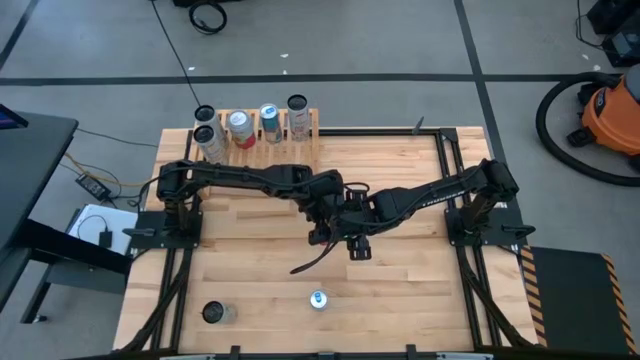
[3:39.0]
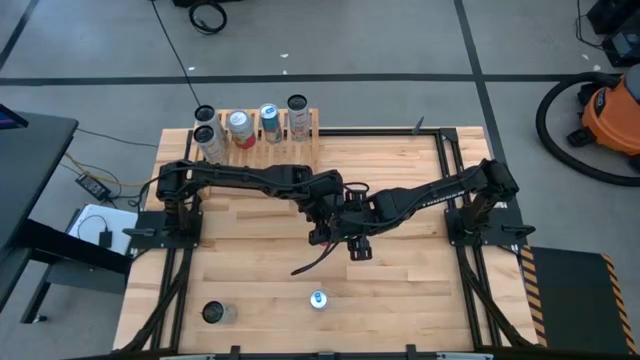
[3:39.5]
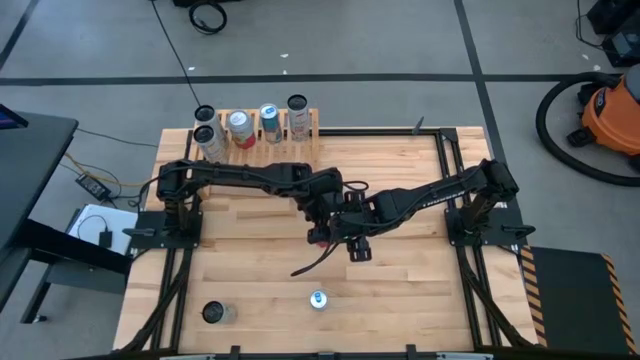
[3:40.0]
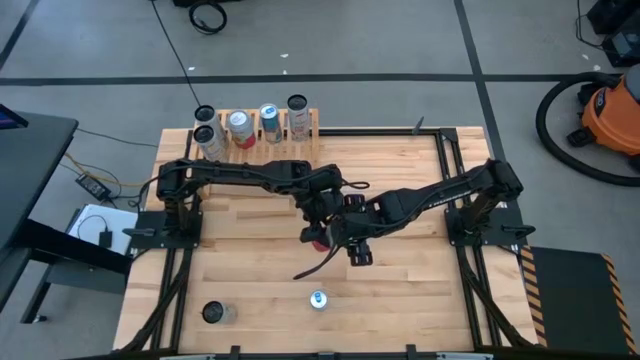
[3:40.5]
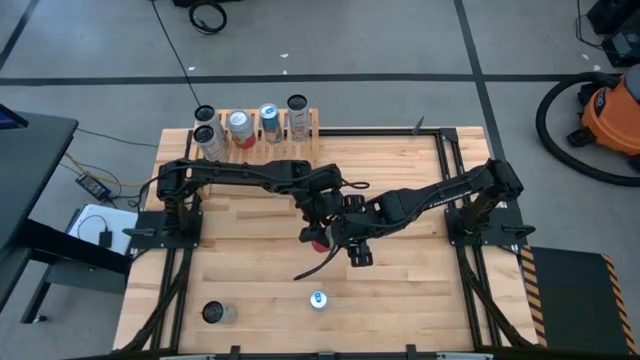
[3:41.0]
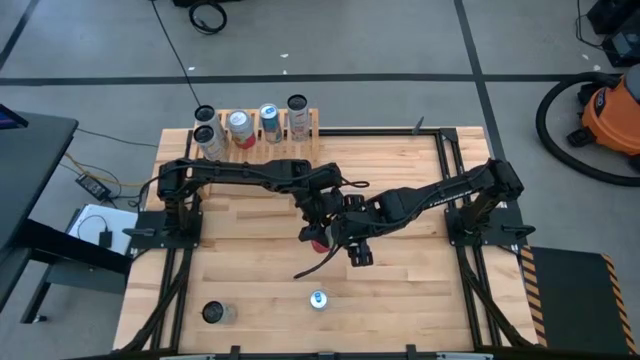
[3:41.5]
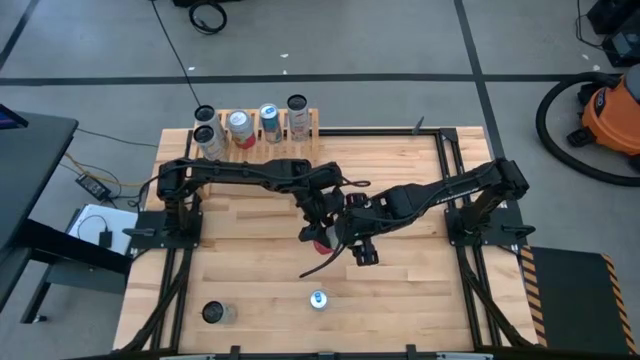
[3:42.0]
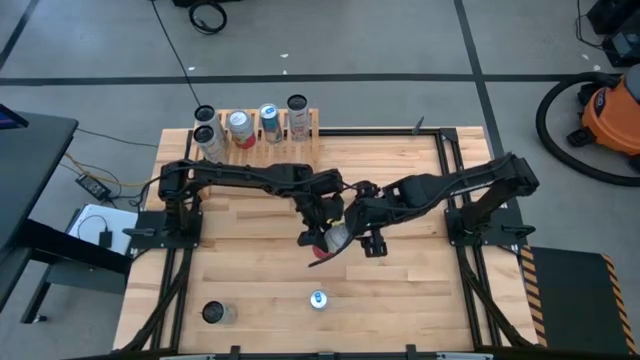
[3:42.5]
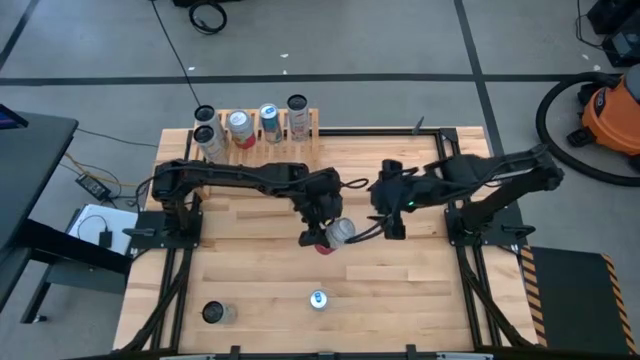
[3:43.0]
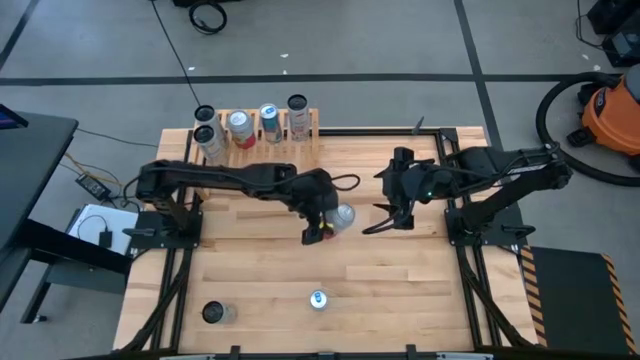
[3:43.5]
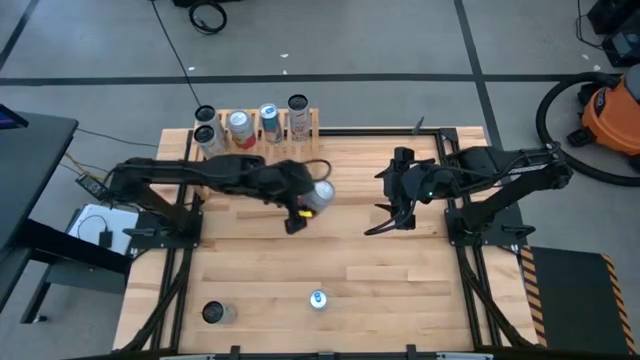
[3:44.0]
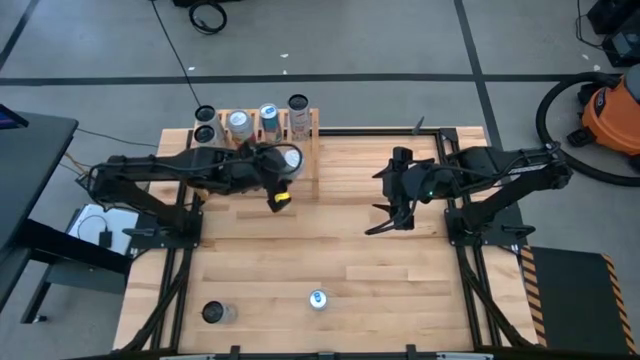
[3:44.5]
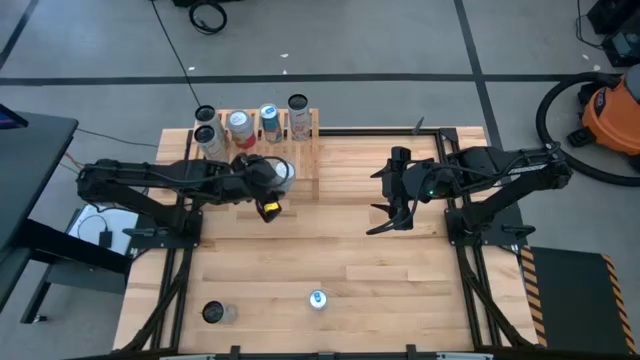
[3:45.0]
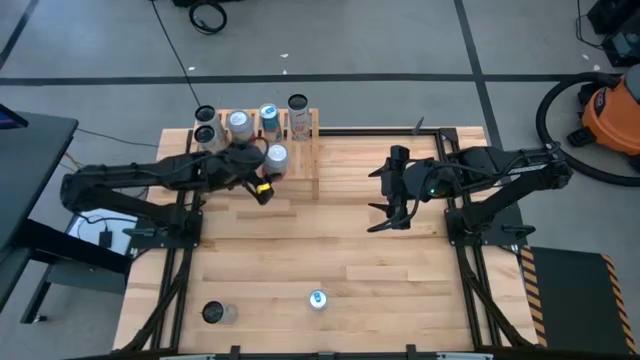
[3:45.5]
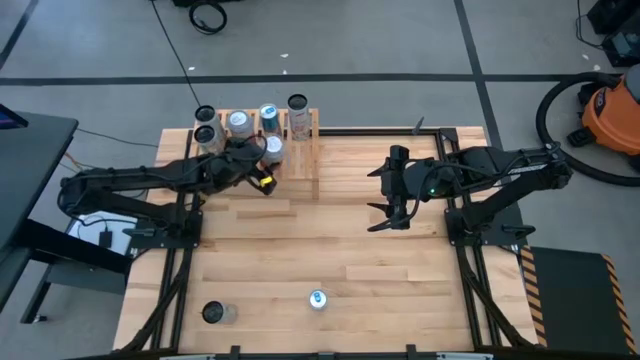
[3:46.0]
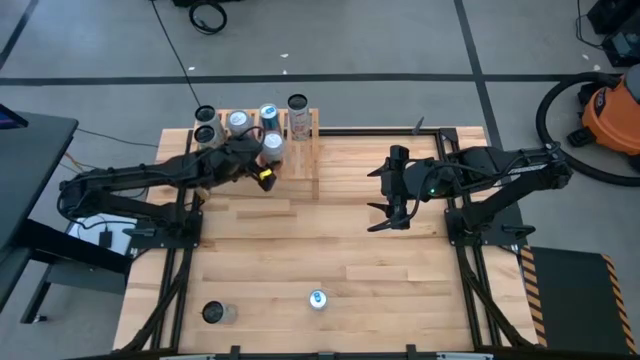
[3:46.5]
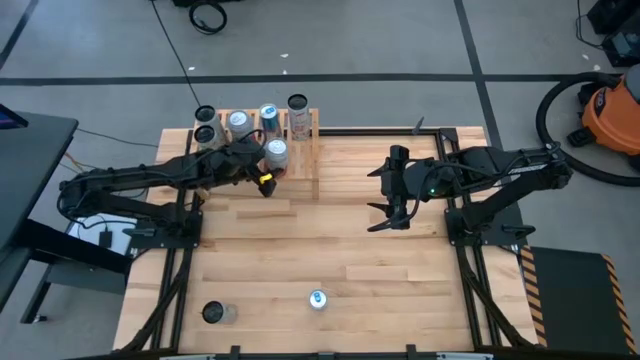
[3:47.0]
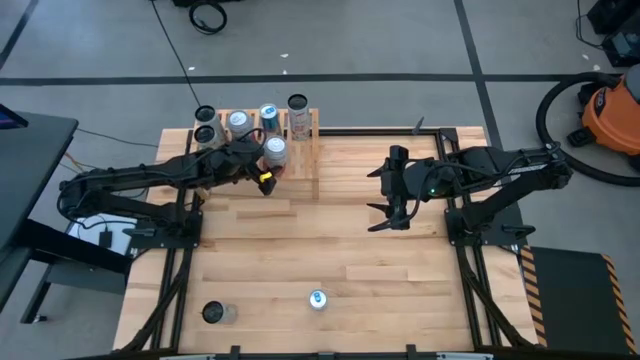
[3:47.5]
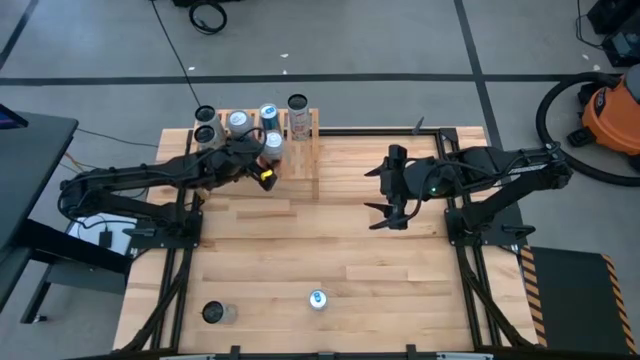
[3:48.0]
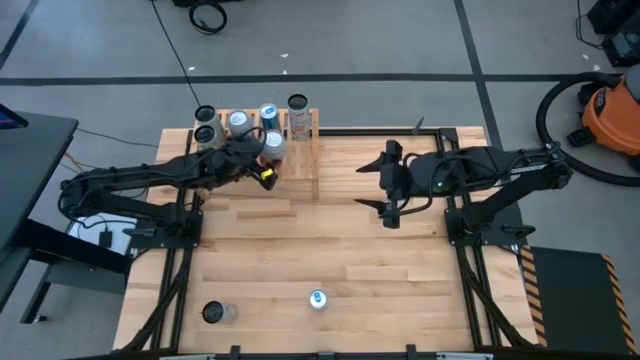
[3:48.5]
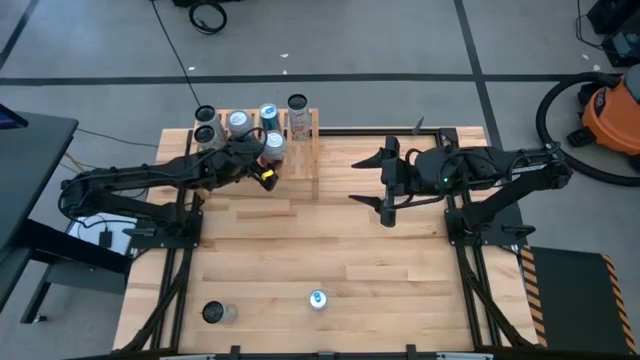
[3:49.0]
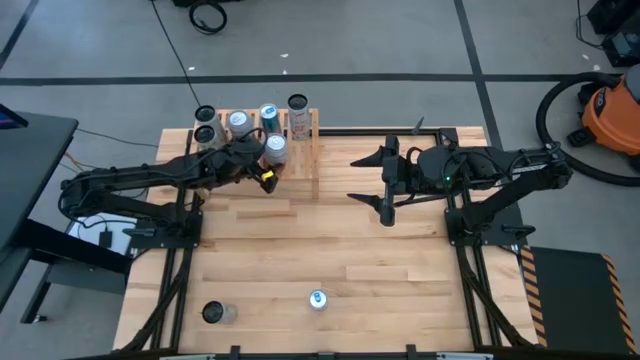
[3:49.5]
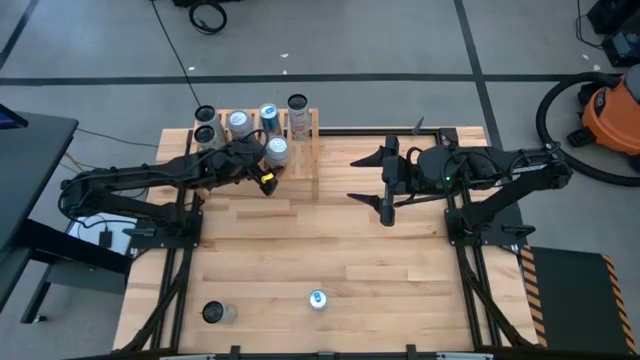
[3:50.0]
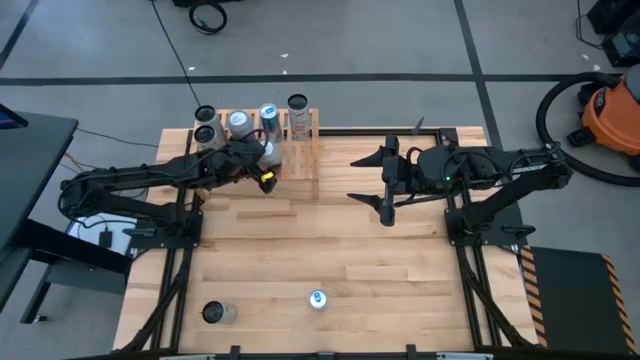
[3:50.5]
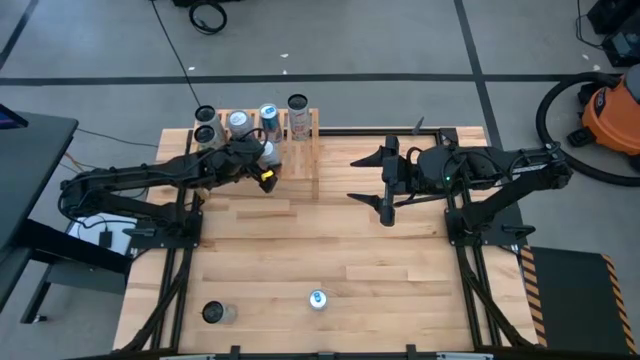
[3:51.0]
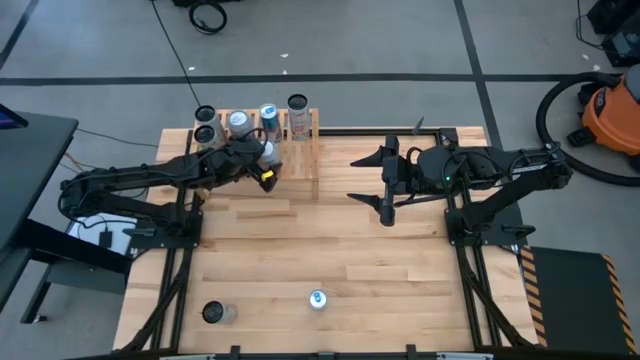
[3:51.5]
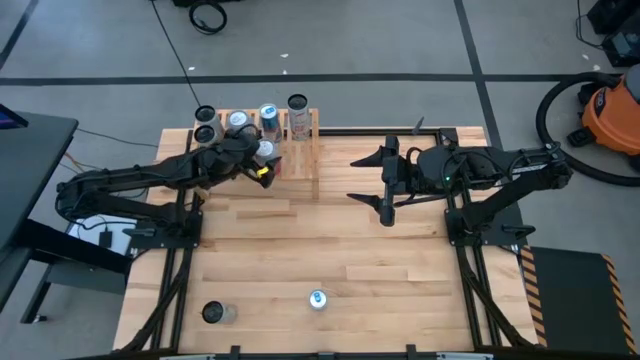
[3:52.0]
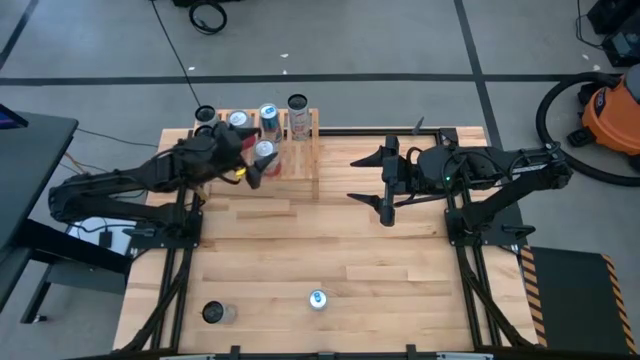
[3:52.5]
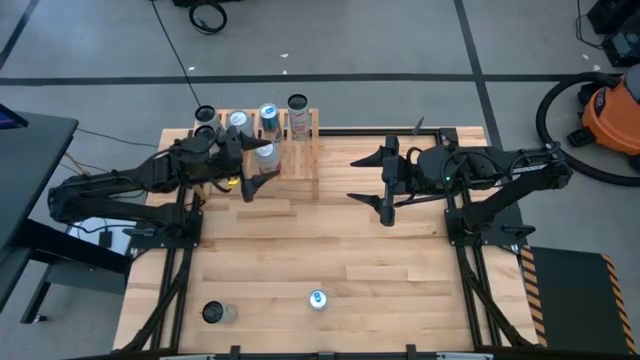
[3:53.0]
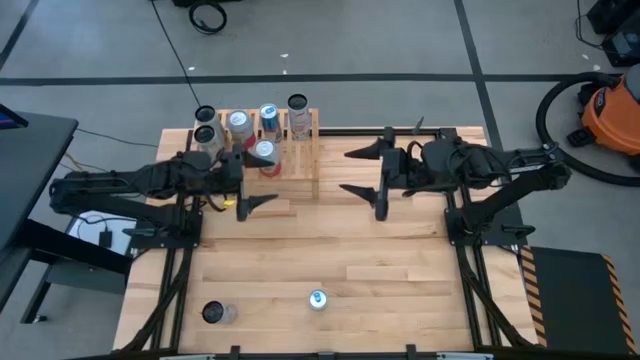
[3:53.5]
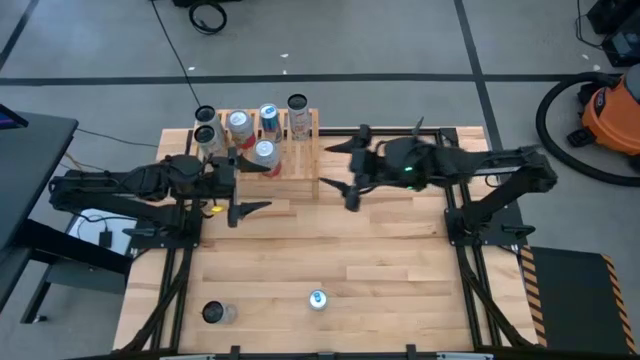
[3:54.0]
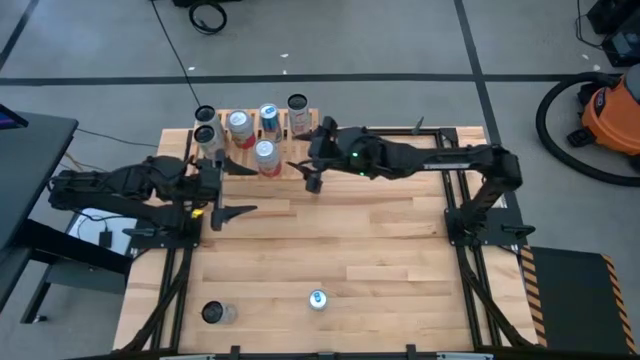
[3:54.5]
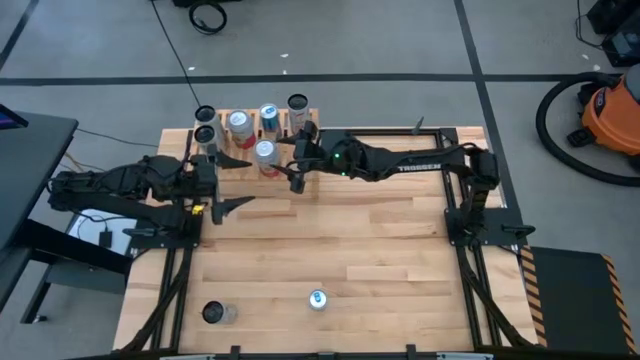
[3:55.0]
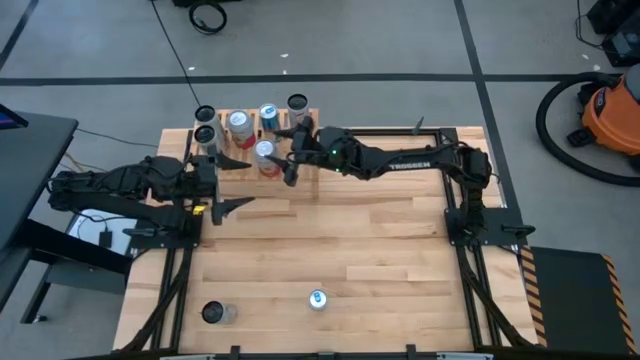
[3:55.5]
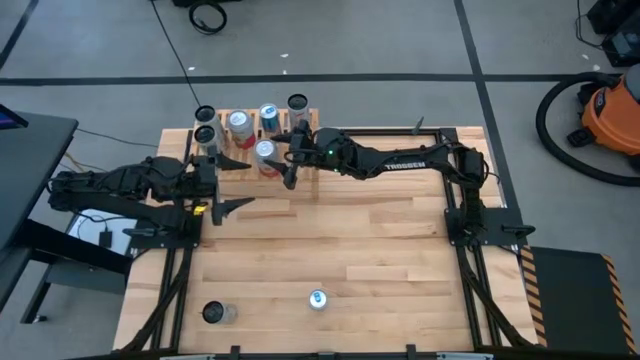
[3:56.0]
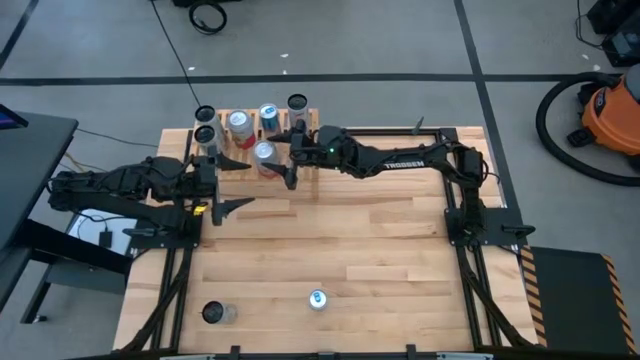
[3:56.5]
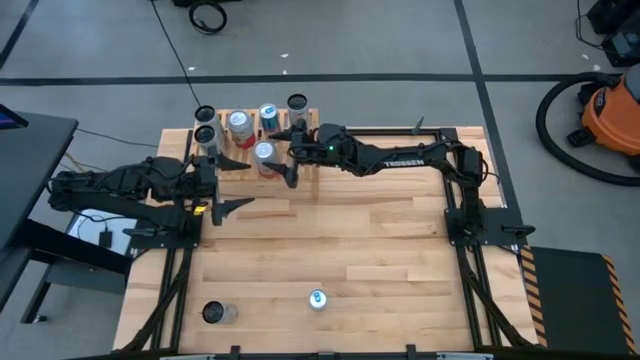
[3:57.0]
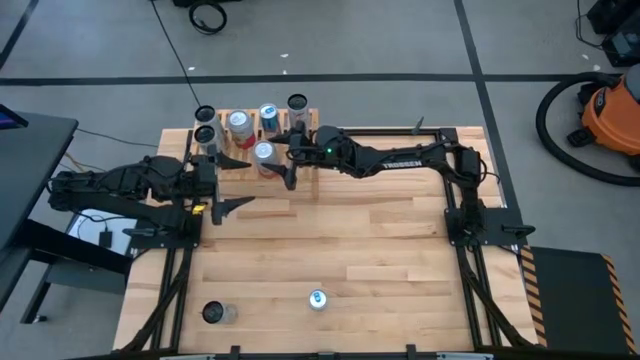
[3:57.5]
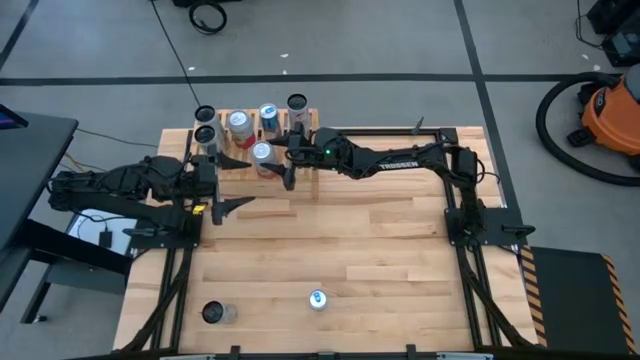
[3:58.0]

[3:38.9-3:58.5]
Task: Place canned beverage on shelf
Put the pink white soda can on the shelf aligned with the other pink white soda can

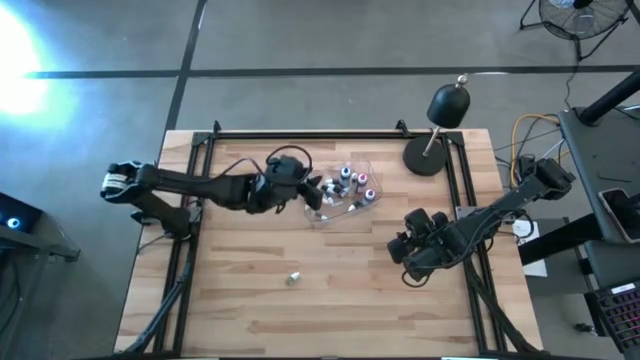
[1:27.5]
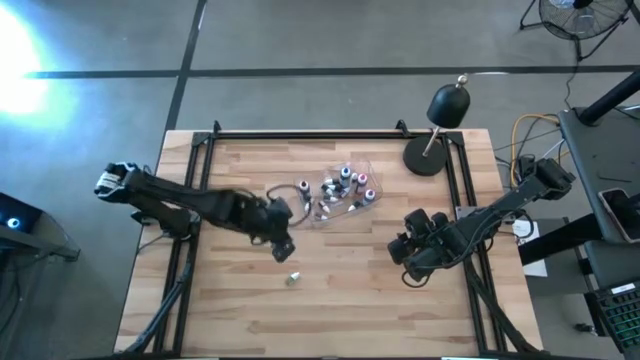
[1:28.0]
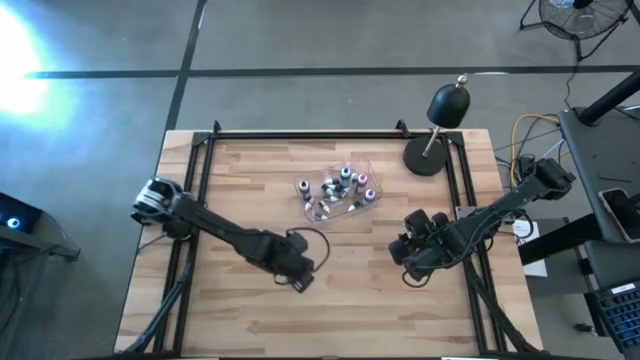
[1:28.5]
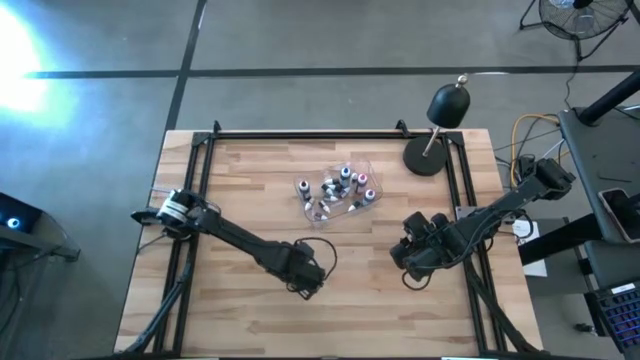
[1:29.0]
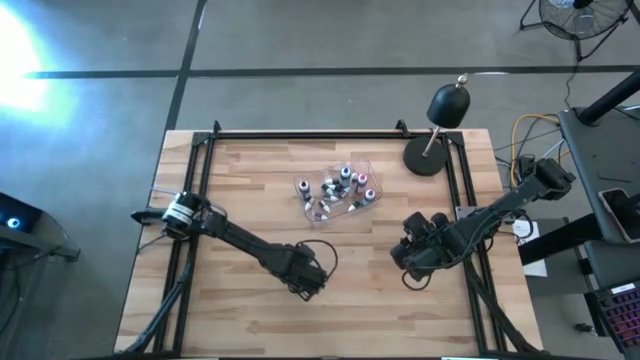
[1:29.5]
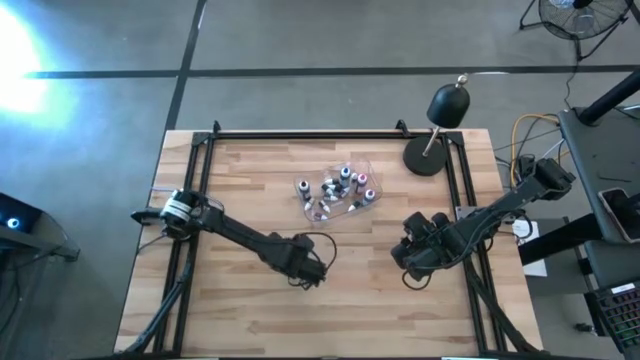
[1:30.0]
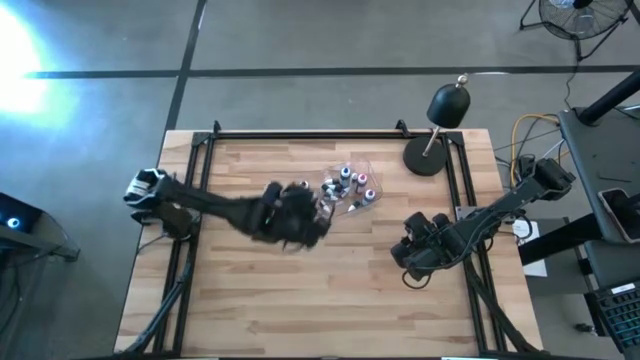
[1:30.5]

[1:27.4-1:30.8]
Task: Pick & Place food coloring
Put the small green food coloring bottle into the transparent bin
